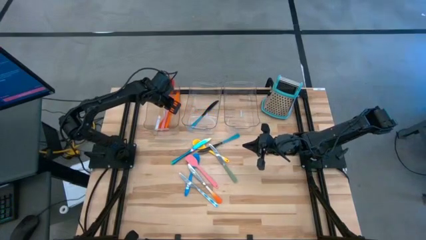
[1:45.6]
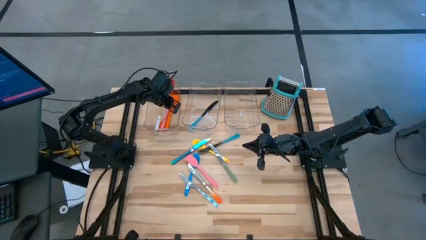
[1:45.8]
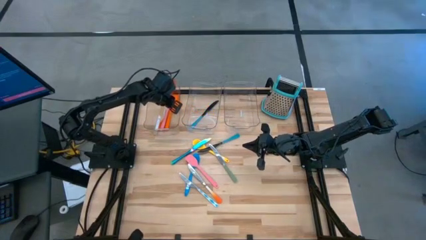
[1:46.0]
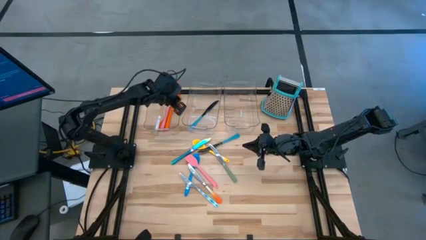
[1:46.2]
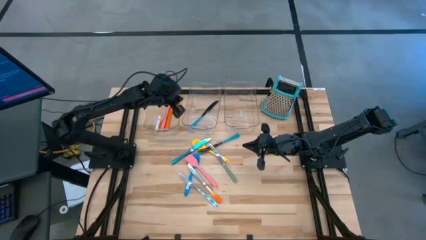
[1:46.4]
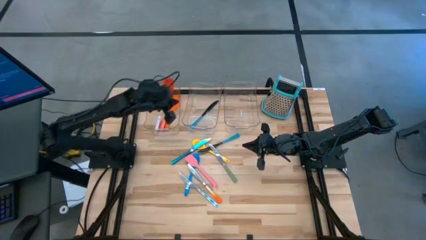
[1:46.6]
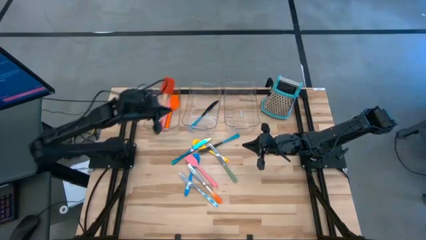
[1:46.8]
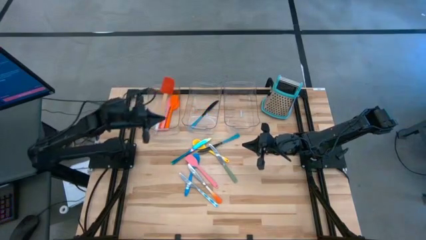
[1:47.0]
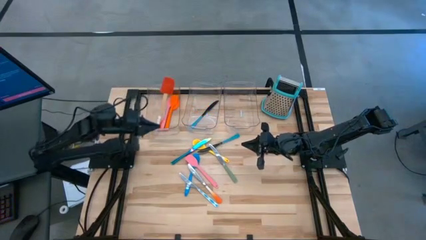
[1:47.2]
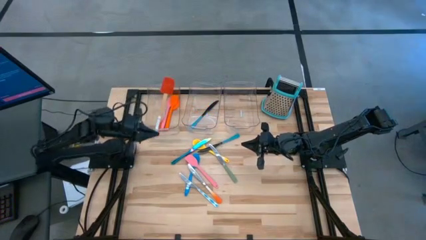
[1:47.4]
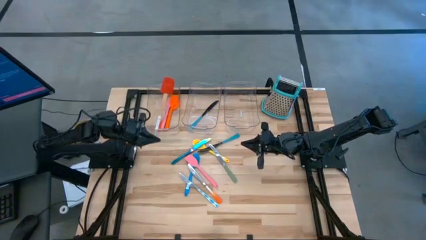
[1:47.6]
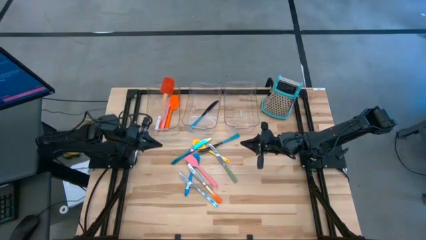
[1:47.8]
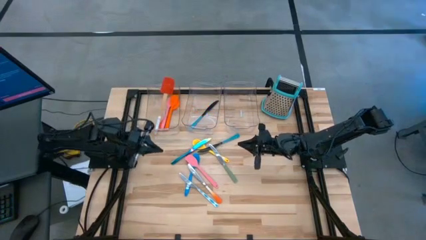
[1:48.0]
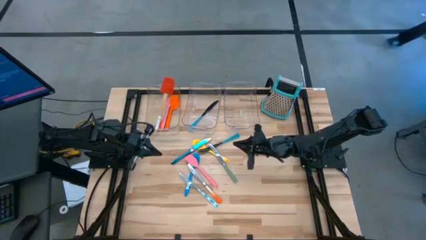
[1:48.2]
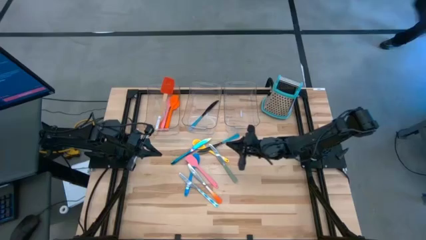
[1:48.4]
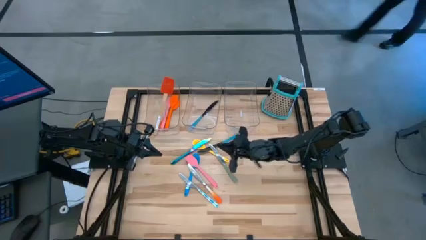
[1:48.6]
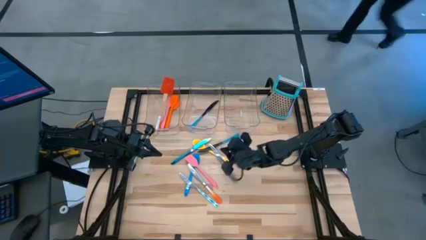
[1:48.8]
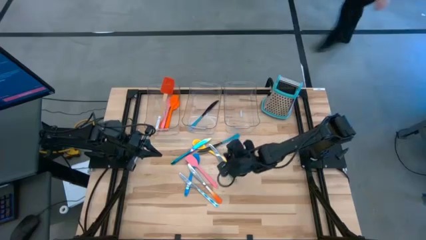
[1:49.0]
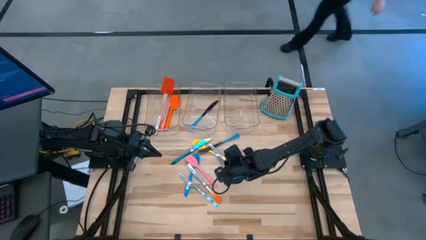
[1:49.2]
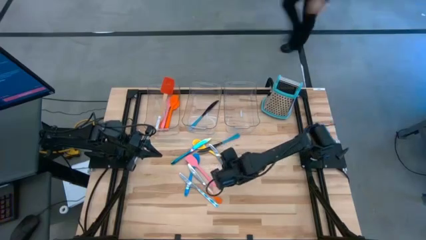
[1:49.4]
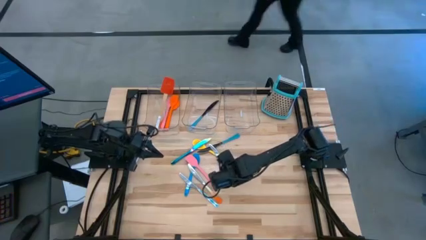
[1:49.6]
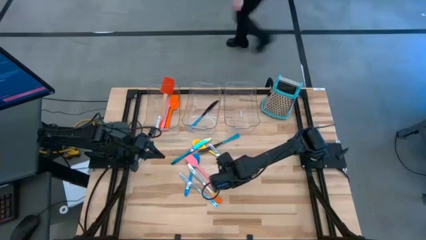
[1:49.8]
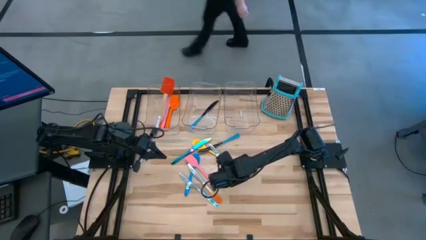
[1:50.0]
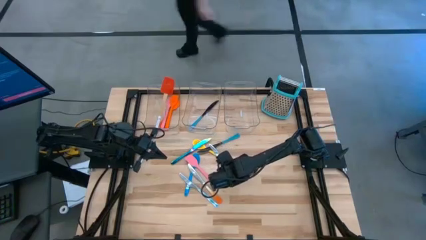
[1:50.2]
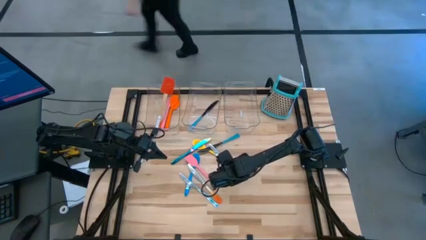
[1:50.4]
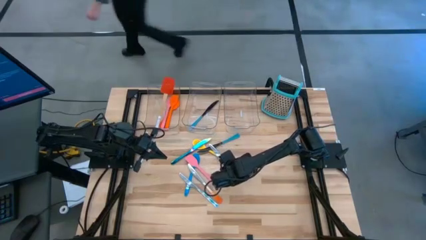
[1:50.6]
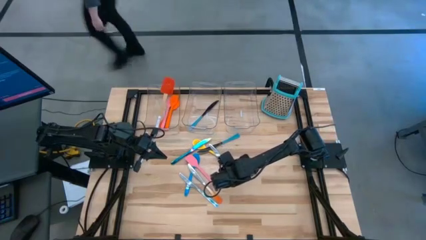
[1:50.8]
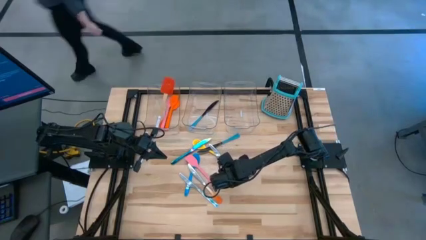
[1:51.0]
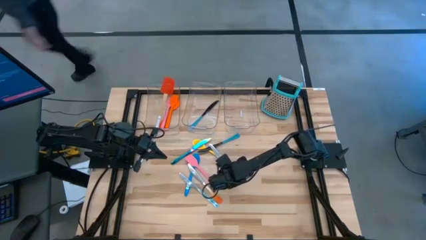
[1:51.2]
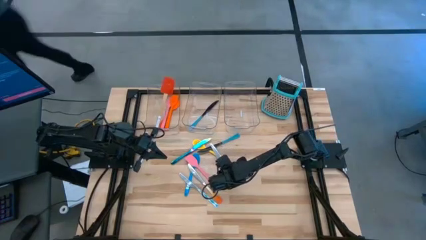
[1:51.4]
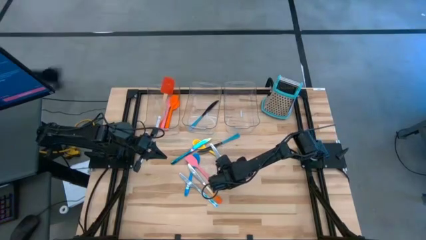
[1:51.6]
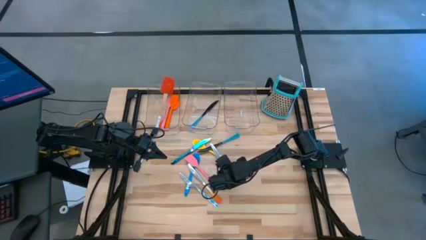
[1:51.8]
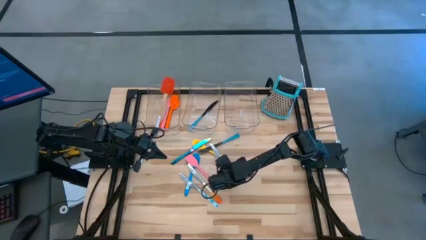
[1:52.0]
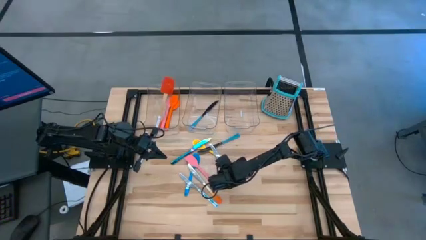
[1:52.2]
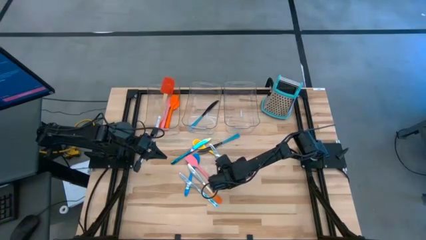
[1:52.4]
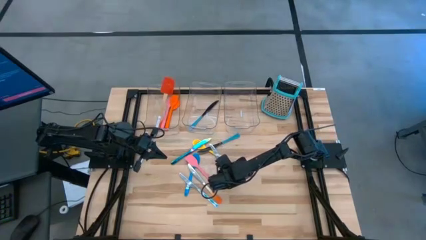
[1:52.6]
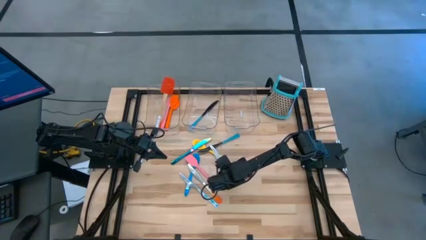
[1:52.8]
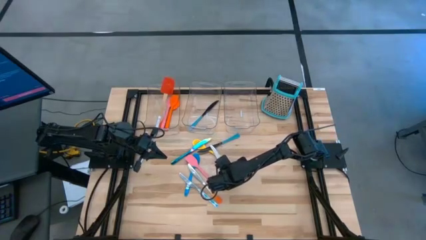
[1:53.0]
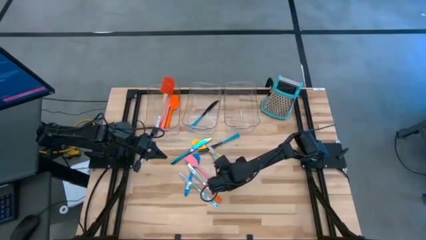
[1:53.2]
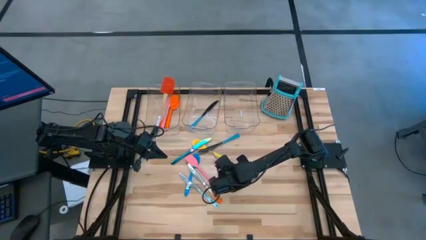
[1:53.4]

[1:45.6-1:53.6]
Task: Pick & Place Kitchen Items
Put the green knife into the middle transparent bin

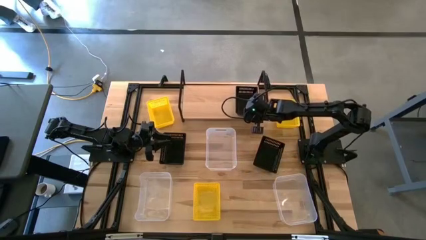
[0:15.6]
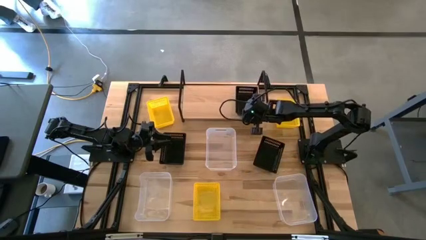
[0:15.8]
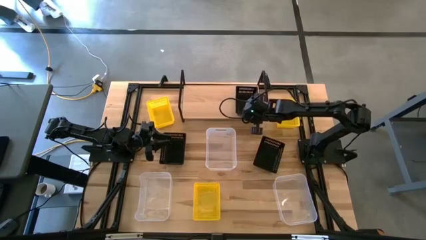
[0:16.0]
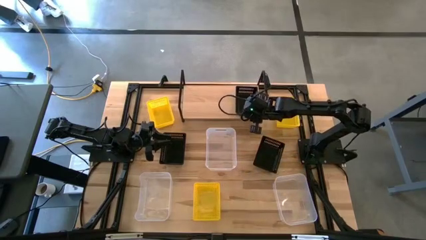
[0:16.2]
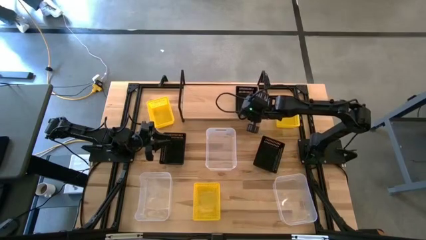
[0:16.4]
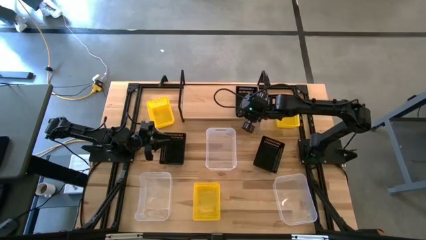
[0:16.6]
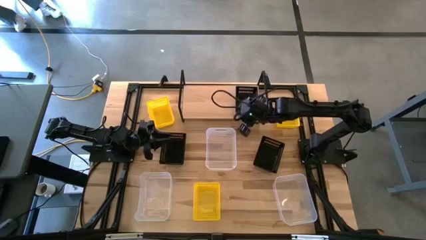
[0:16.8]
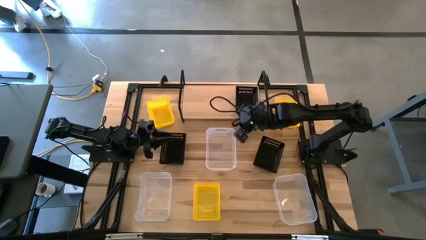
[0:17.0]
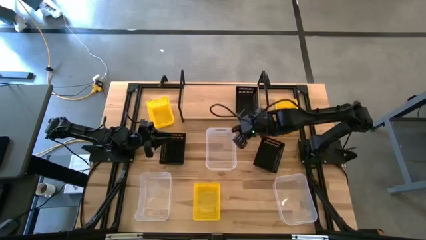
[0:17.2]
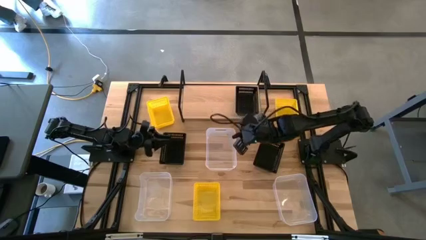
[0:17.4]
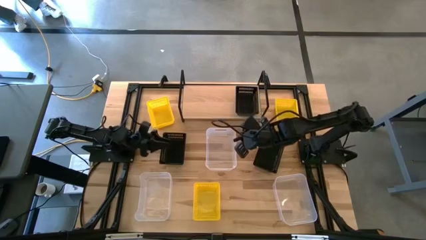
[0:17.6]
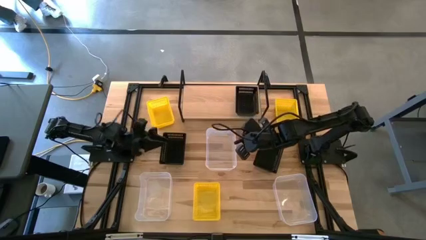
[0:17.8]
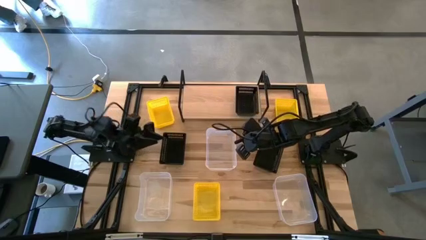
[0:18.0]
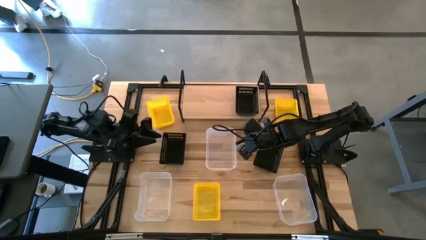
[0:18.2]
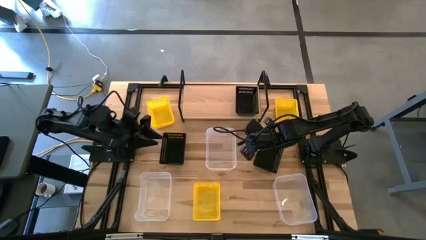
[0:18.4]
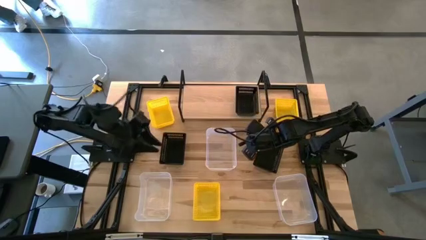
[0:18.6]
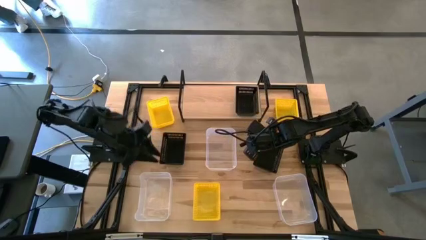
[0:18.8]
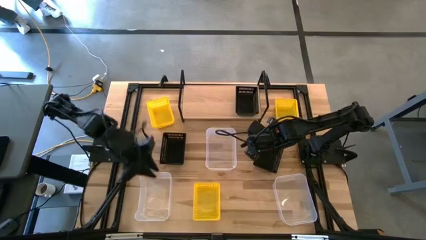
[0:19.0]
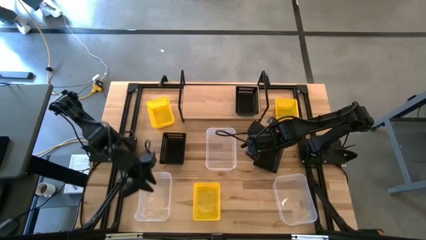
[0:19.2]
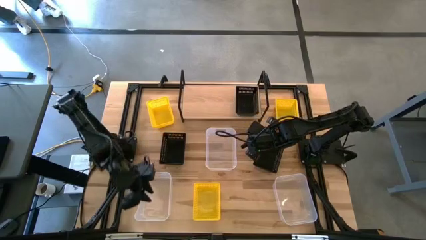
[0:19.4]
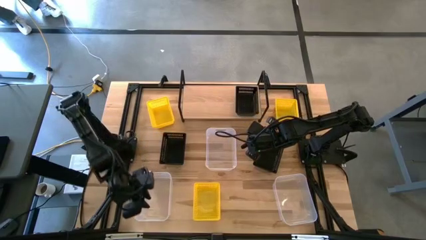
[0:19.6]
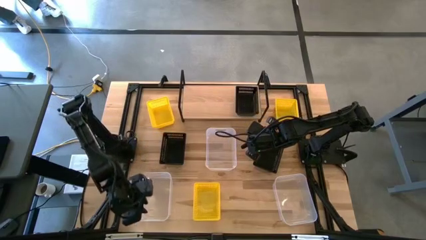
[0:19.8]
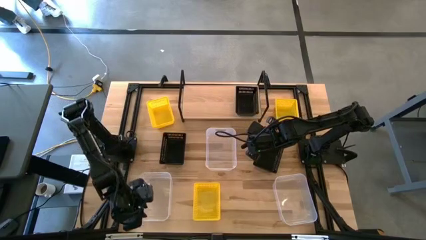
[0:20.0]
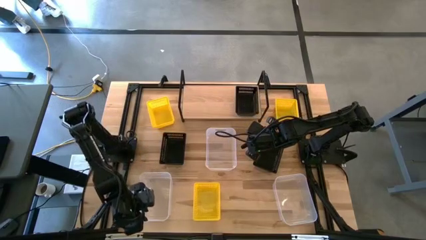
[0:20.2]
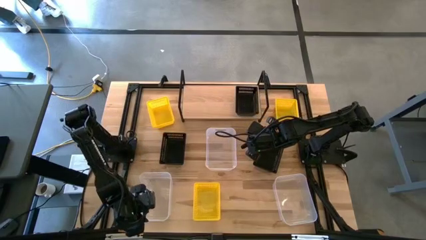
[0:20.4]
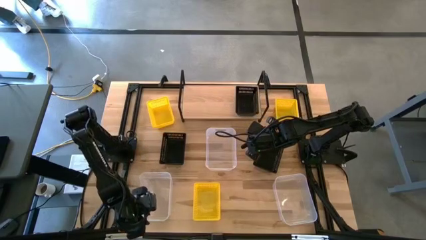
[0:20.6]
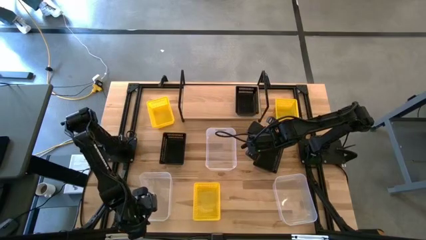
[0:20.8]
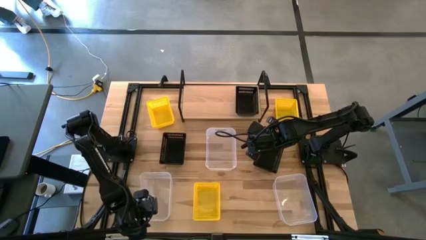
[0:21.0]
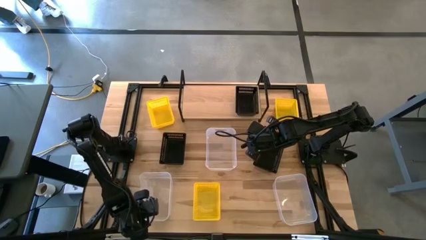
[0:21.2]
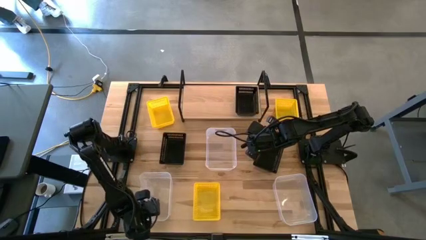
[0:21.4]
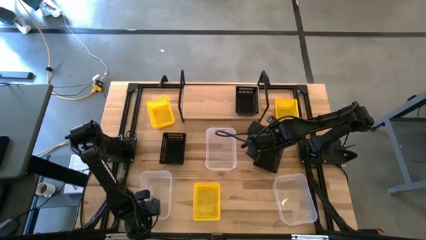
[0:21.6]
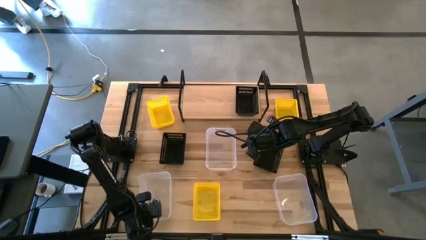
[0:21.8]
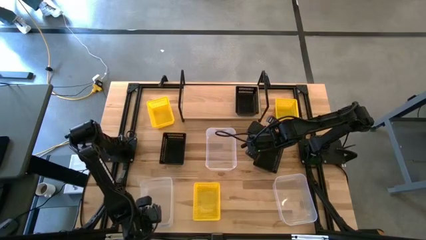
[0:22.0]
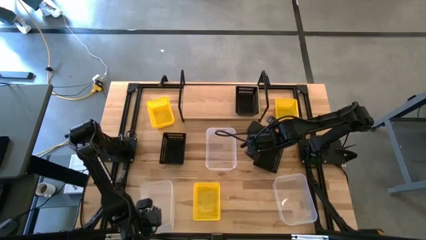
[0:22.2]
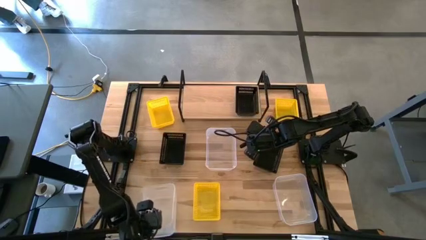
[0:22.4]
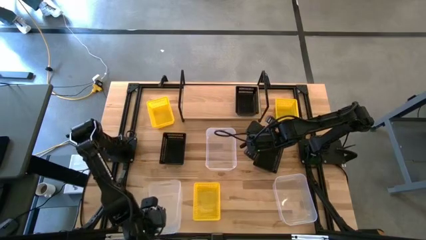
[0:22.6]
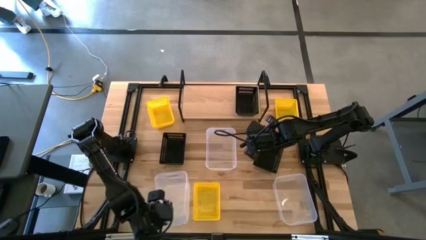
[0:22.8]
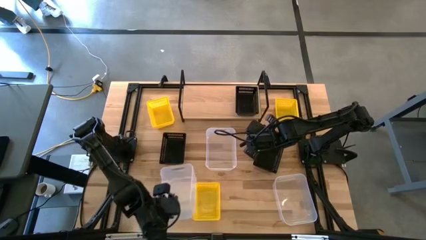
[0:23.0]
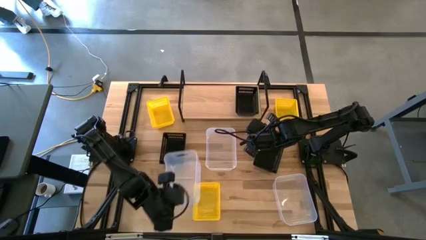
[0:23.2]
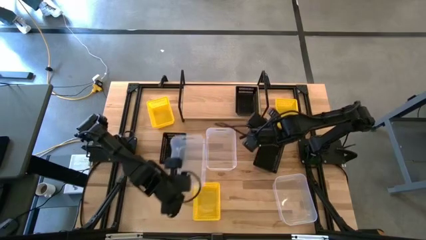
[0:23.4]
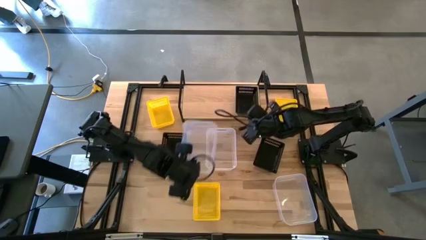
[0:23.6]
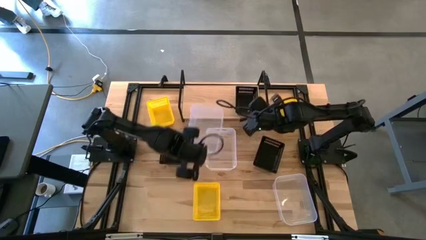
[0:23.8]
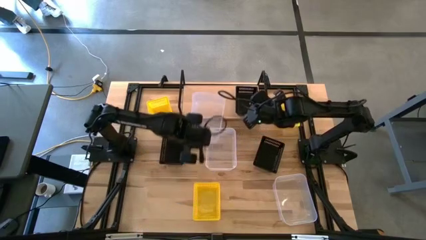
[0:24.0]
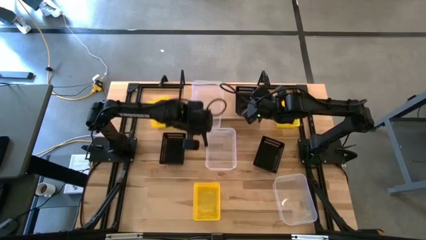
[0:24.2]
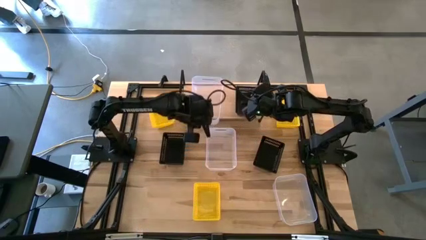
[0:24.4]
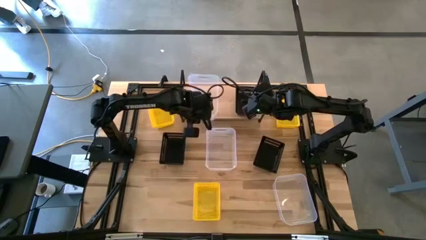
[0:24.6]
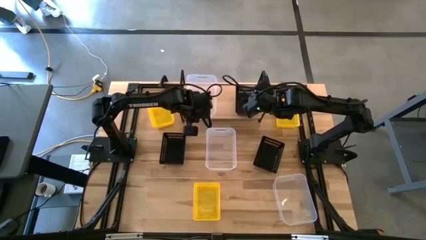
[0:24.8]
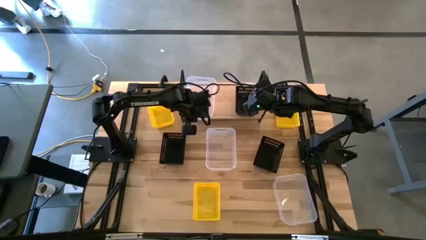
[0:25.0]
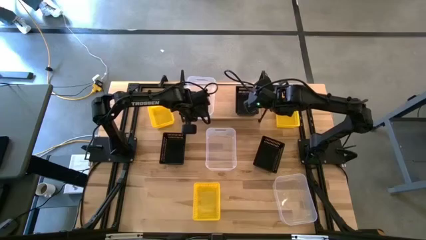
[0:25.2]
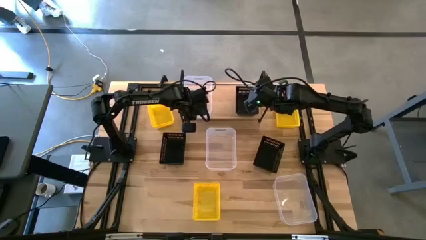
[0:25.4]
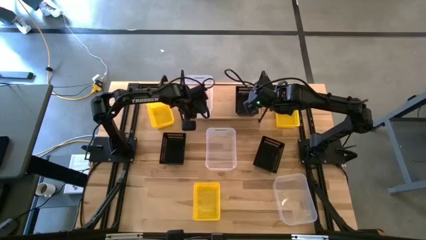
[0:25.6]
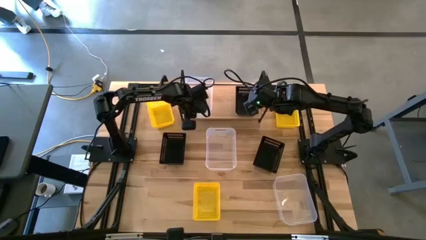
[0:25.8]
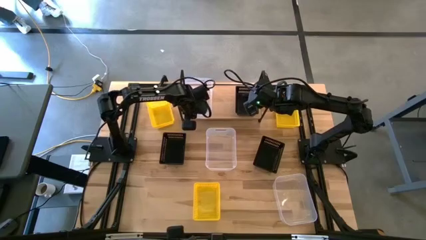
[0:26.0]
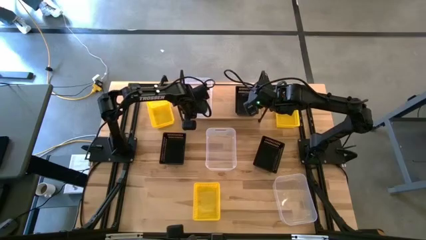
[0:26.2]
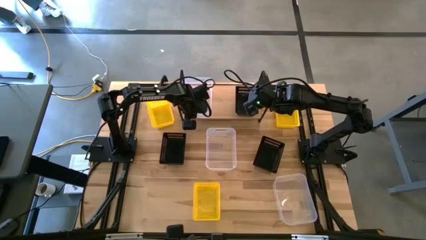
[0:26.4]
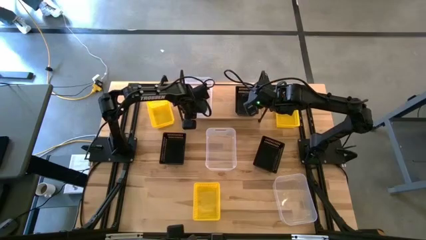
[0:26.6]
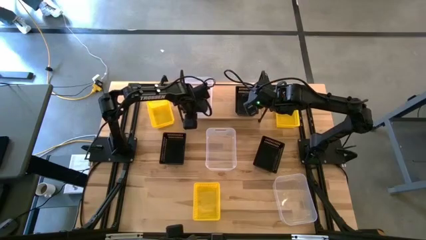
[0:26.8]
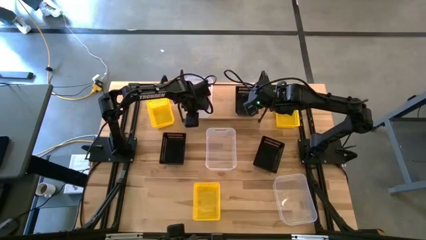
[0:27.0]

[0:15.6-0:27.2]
Task: Stack baskets on shelf by color
Put the bottom left transparent bin on the shelf
